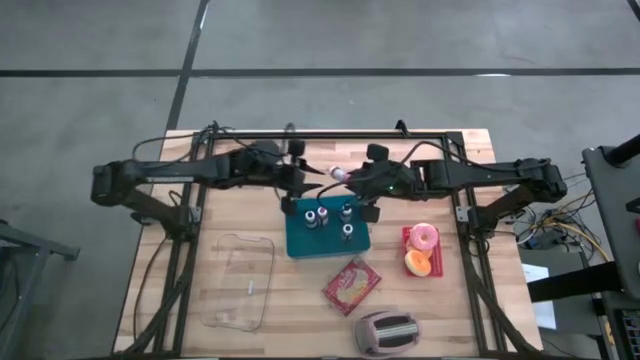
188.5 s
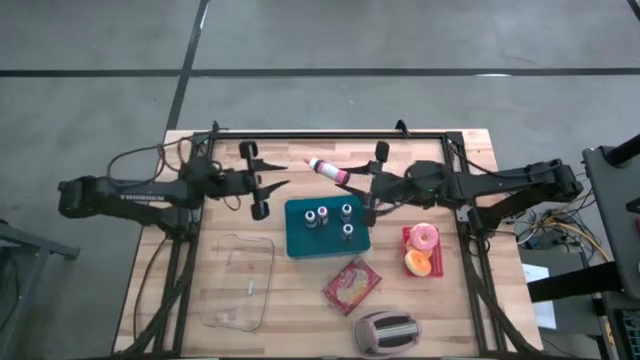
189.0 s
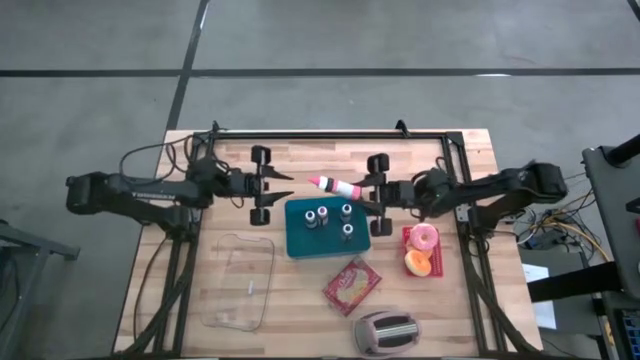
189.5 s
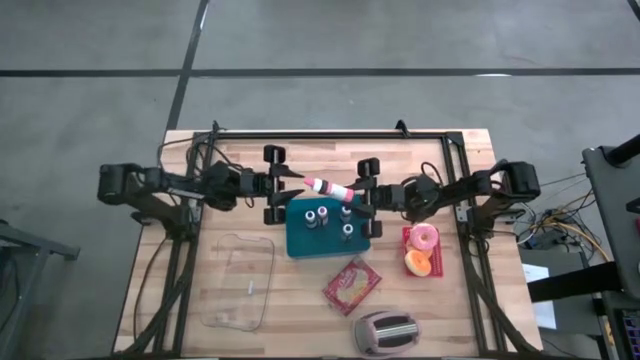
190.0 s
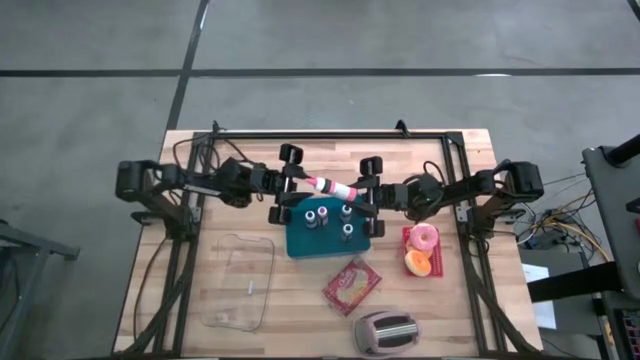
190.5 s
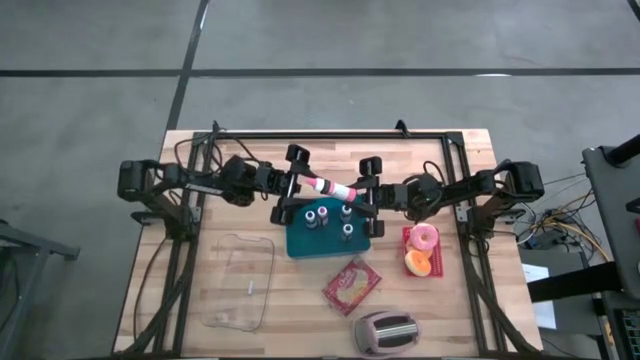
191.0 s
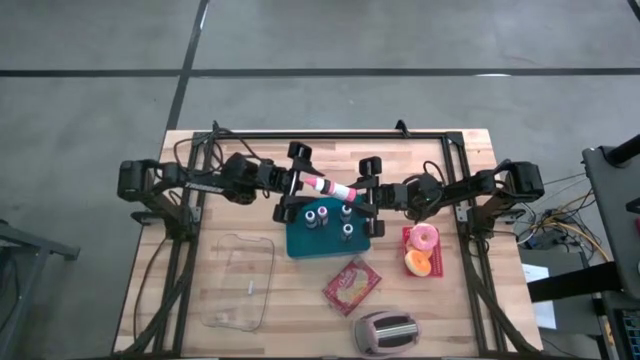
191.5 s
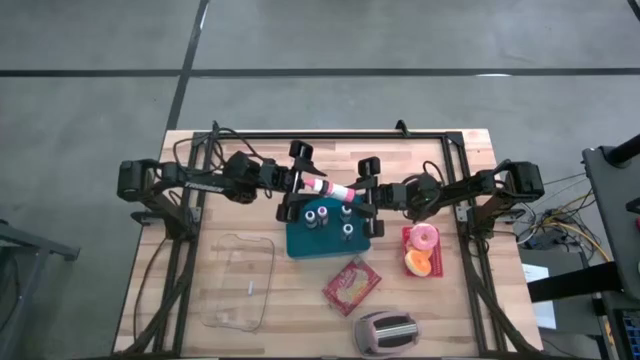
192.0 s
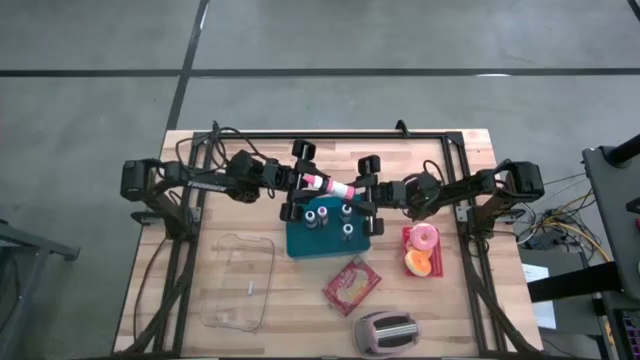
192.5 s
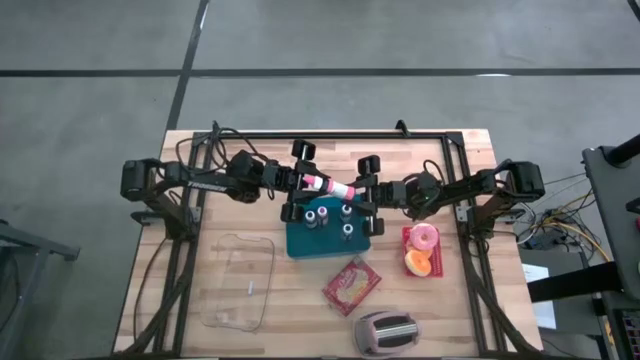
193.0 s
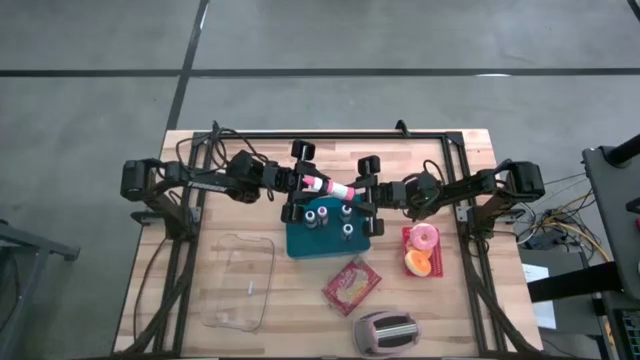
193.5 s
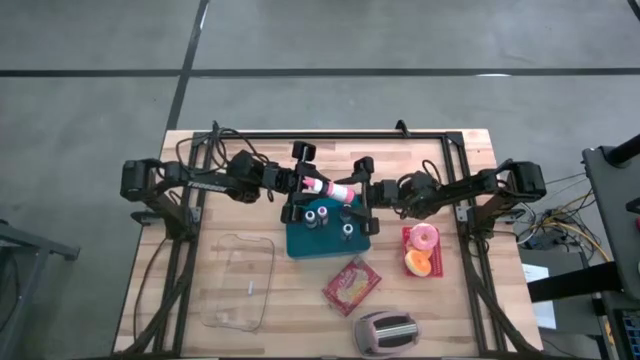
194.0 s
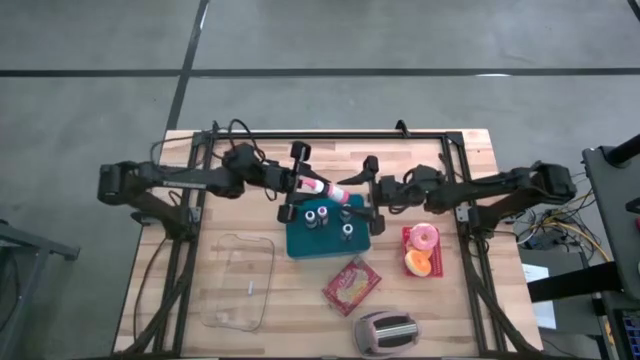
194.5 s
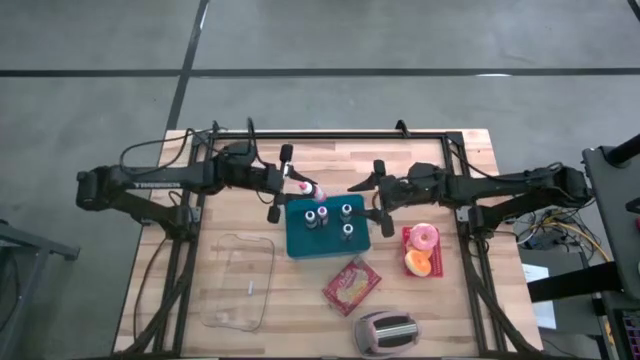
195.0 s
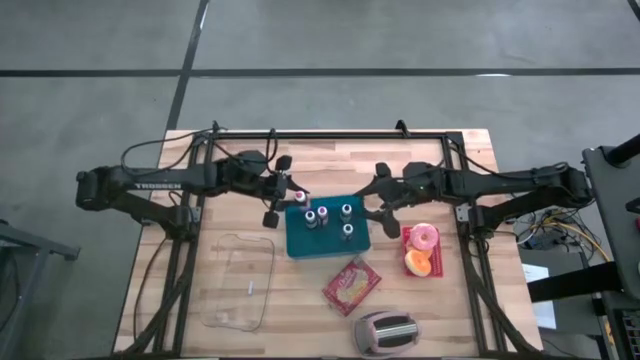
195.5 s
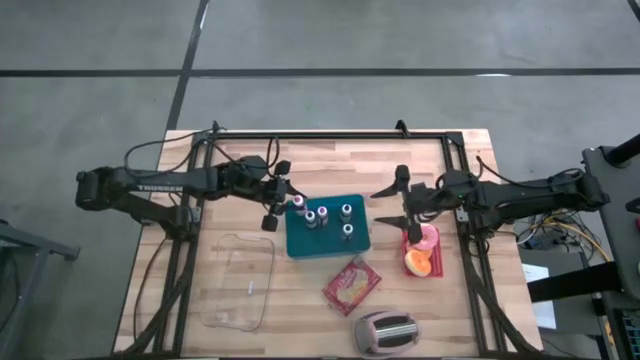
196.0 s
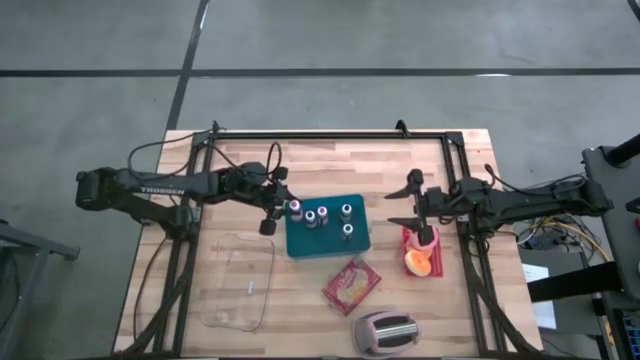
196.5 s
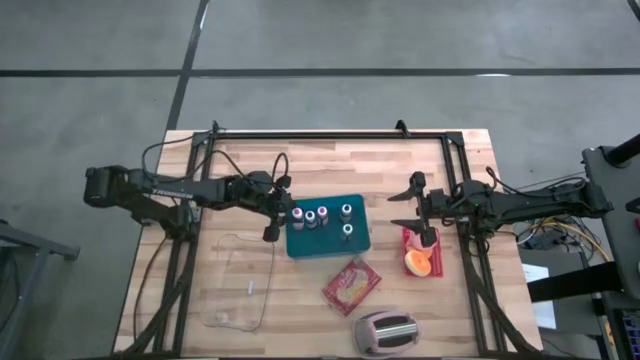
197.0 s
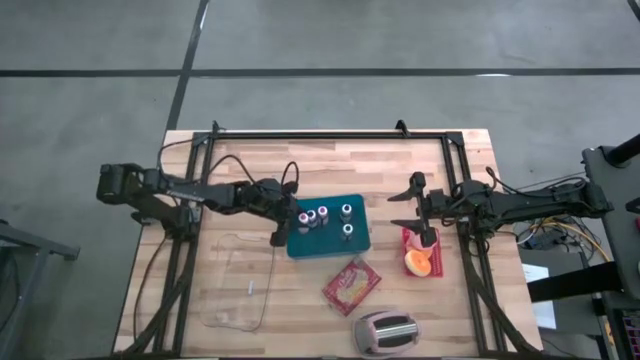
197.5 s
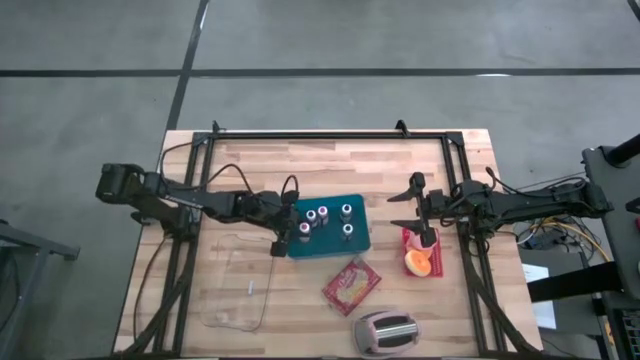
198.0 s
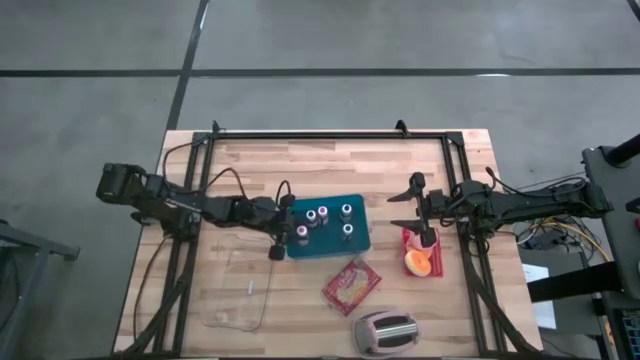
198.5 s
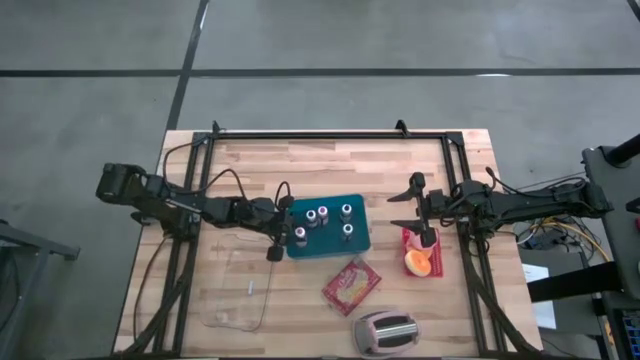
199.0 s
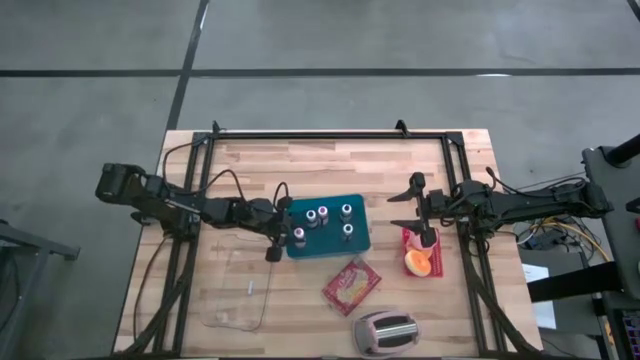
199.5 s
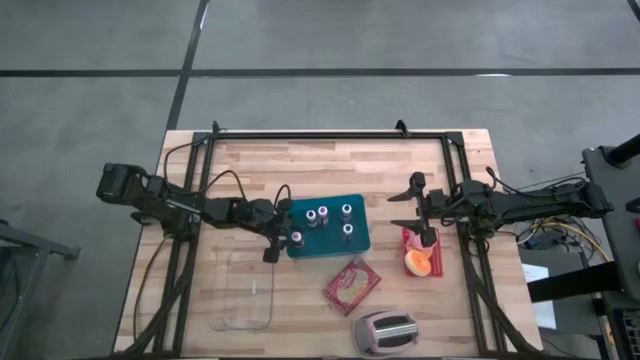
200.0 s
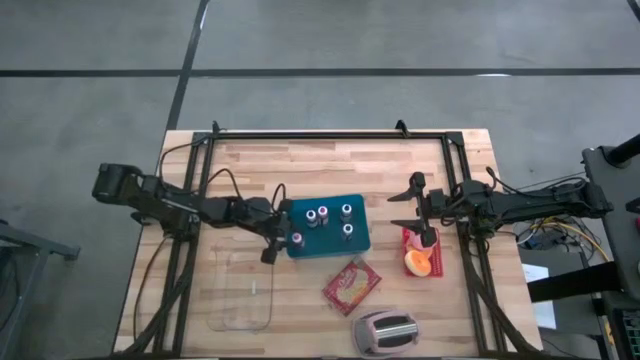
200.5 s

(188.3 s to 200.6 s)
Task: Pick & Place Food Item
Put the pink food coloring bottle into the blue bin

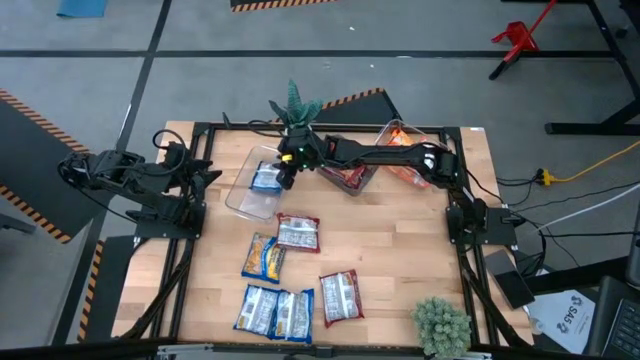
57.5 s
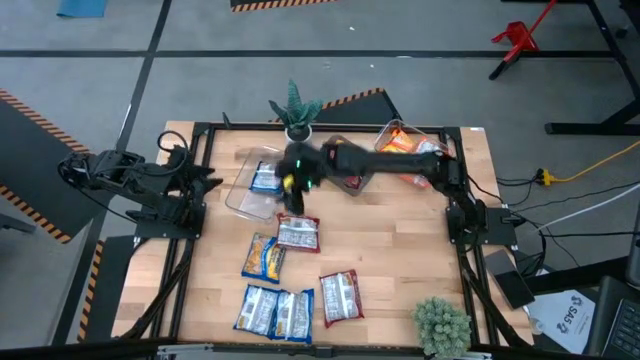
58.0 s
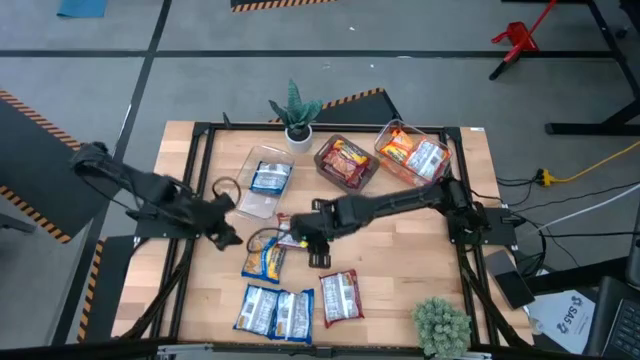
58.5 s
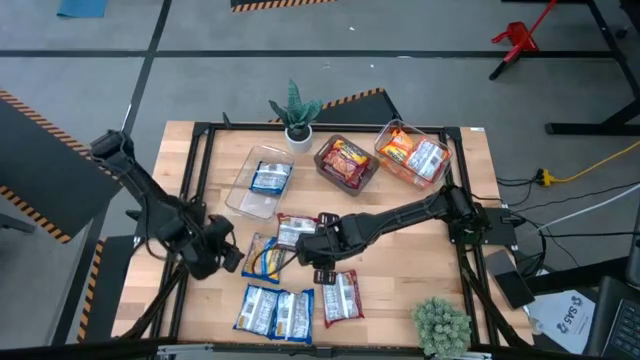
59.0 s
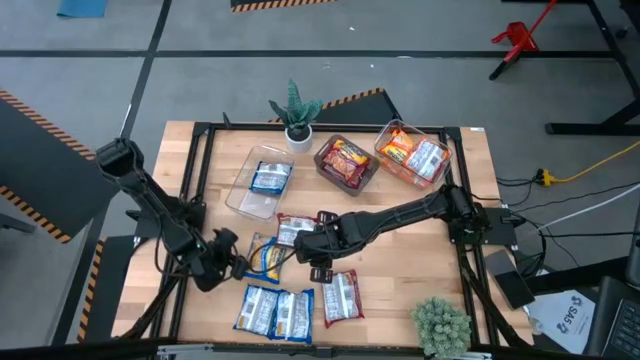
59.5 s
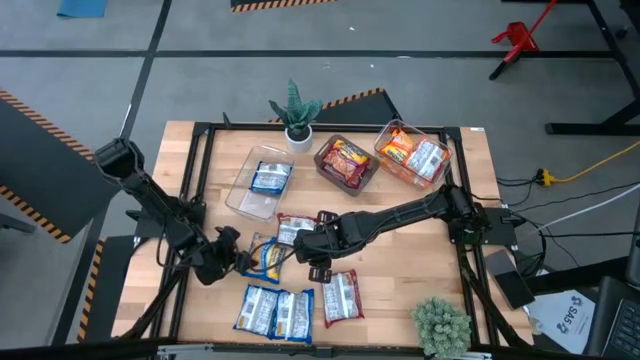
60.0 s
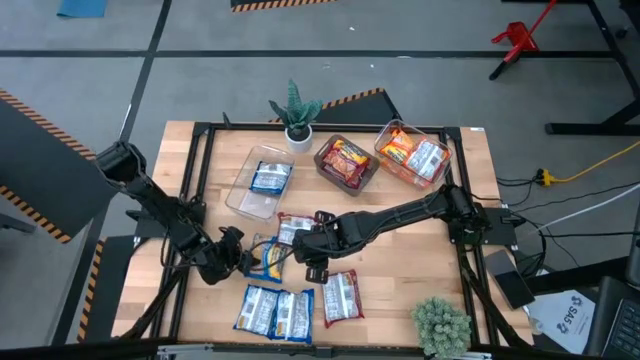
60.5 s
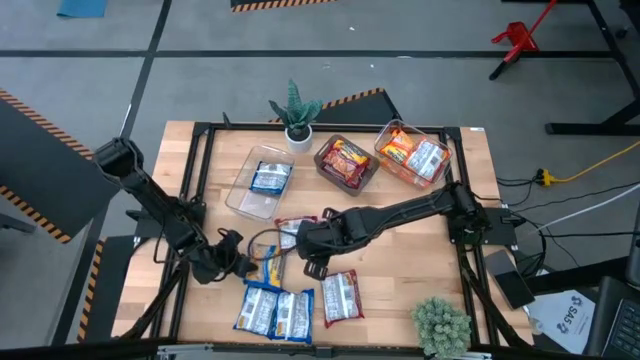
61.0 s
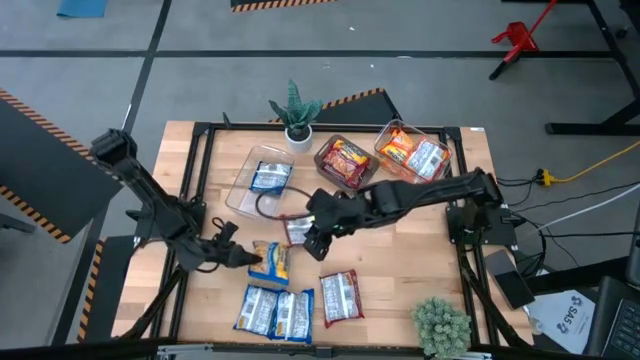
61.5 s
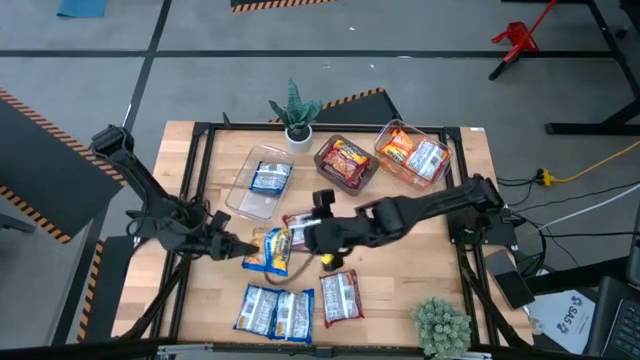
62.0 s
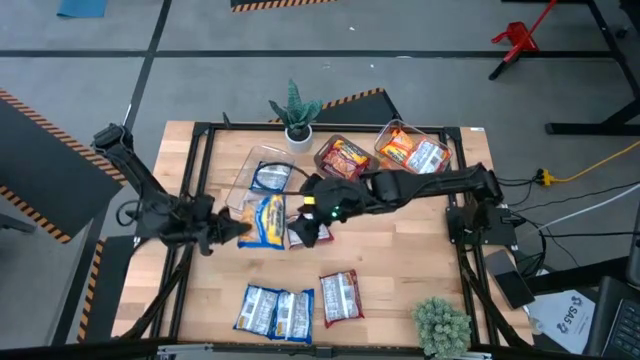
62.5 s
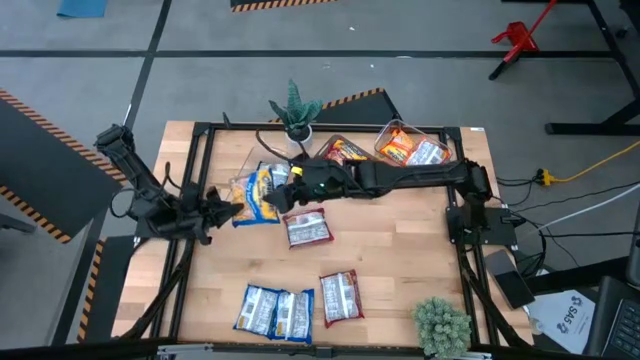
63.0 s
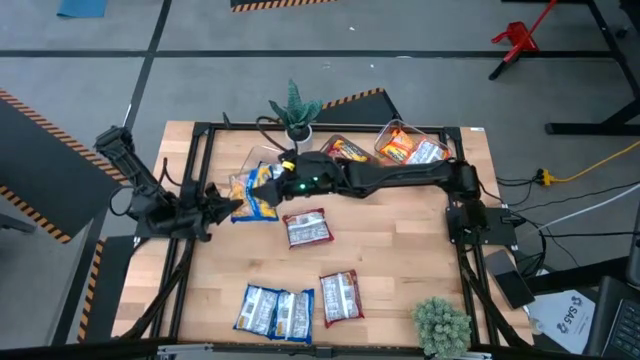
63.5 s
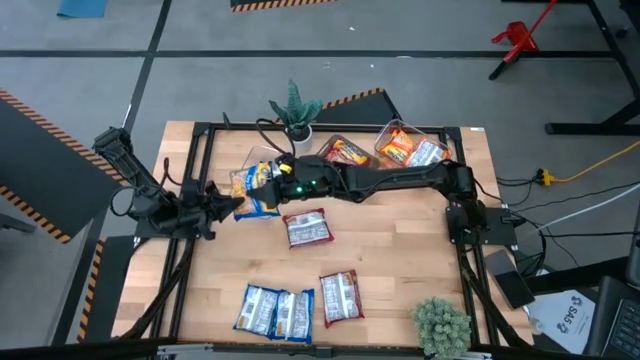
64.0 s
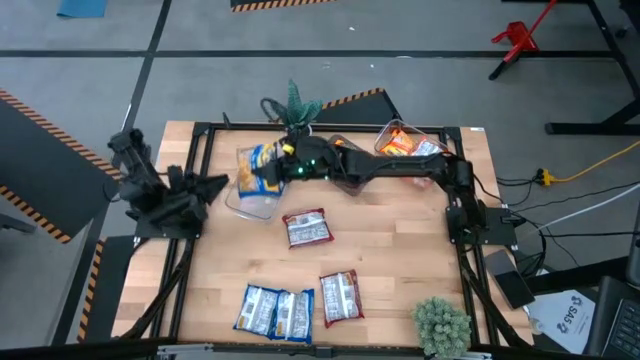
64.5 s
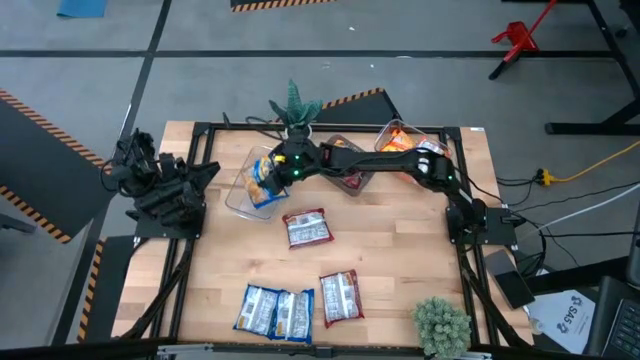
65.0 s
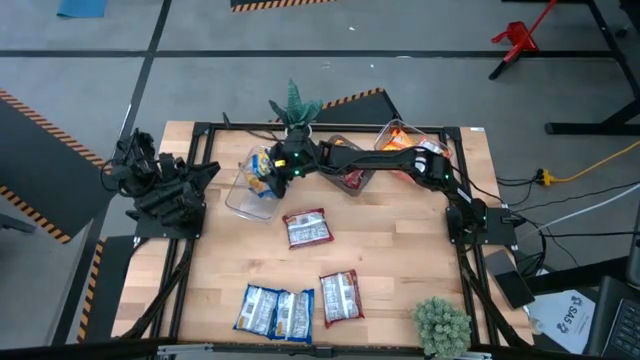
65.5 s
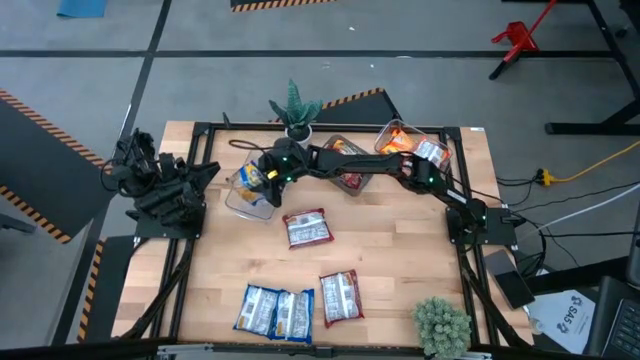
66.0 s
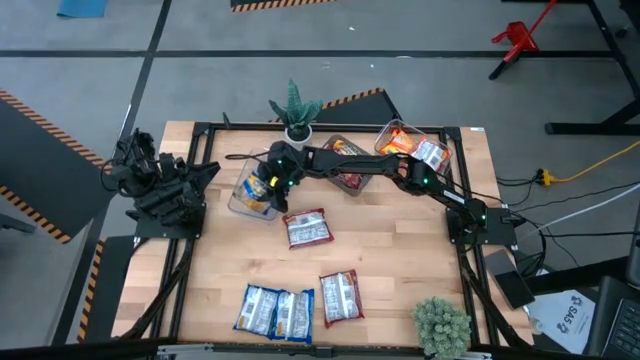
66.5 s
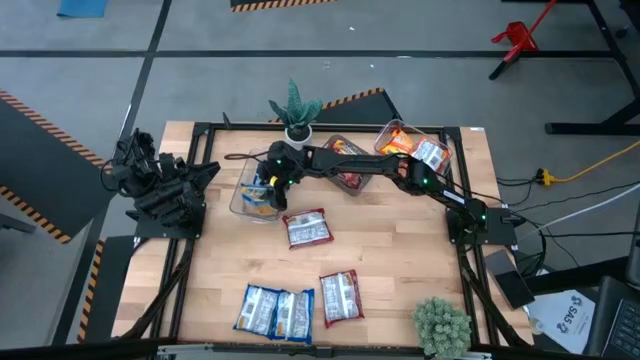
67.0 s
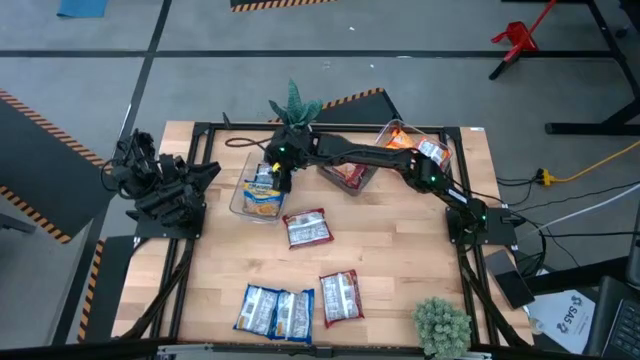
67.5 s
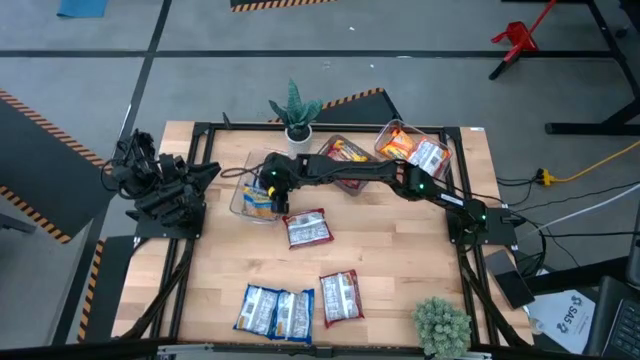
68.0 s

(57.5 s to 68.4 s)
Task: Sort Maruchan noodles
Put the blue noodle pack into the left transparent bin
